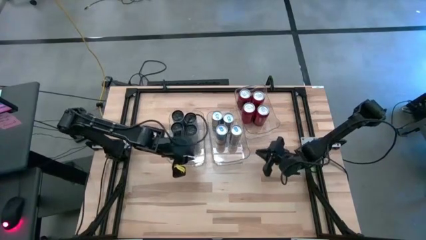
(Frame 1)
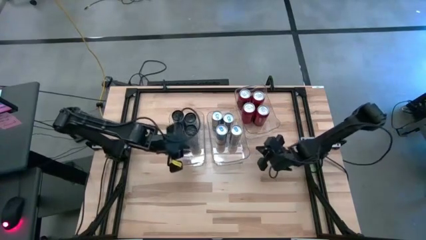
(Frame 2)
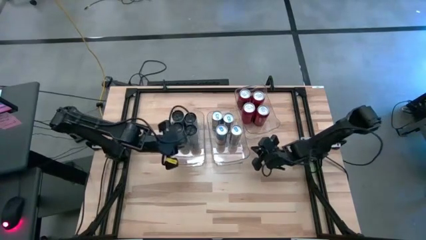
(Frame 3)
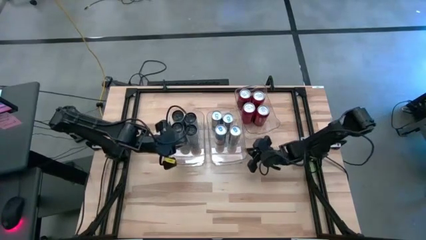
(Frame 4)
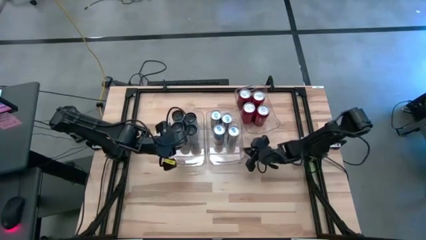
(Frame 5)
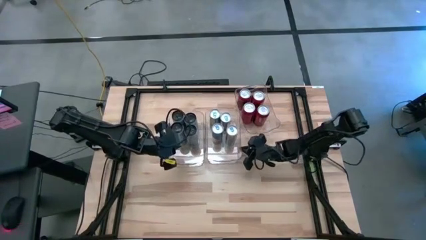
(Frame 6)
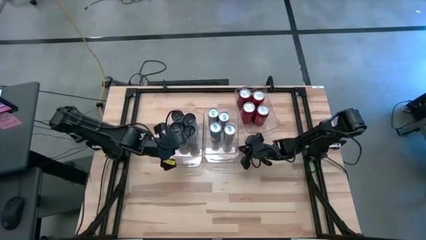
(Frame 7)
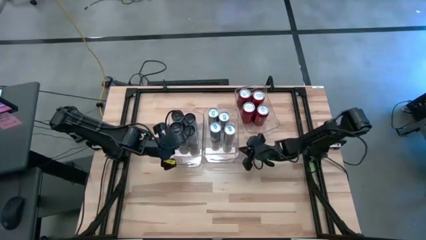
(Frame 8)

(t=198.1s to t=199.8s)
Task: Sort soda cans
Adjust the middle transparent bin

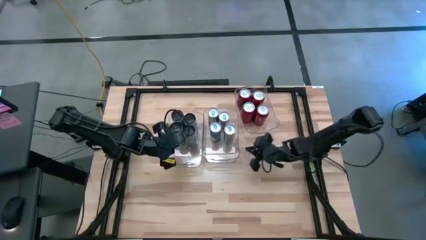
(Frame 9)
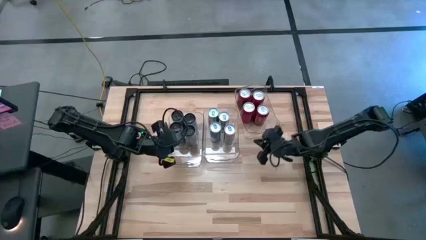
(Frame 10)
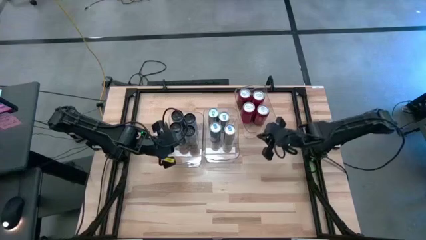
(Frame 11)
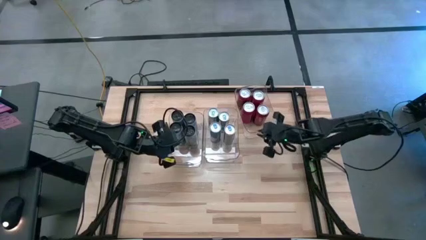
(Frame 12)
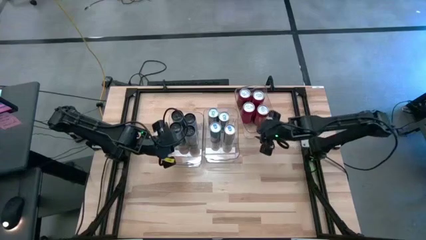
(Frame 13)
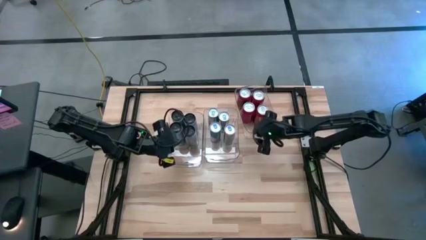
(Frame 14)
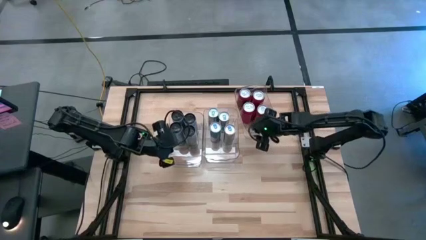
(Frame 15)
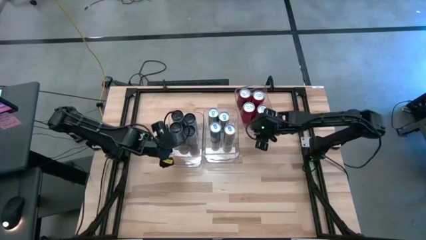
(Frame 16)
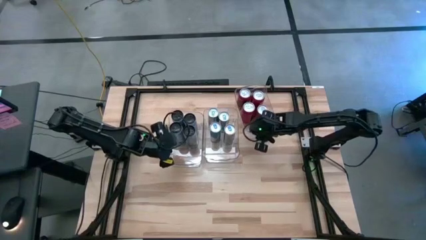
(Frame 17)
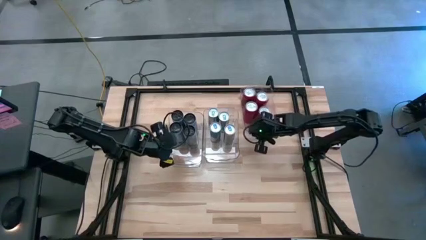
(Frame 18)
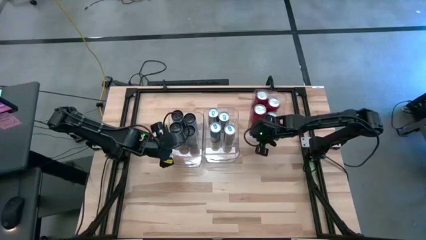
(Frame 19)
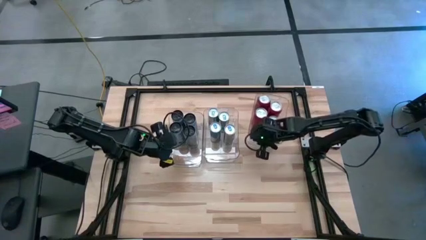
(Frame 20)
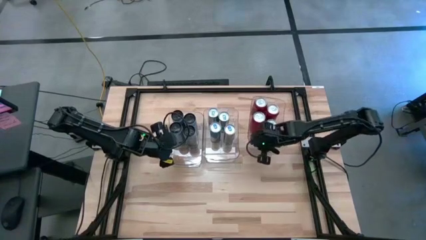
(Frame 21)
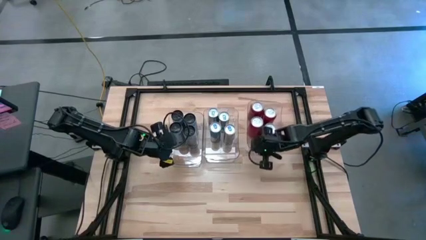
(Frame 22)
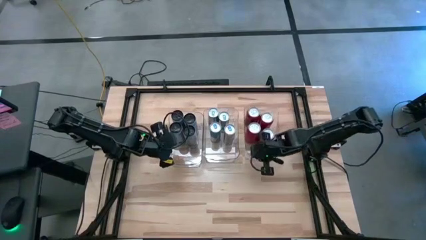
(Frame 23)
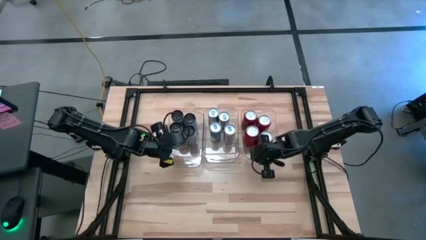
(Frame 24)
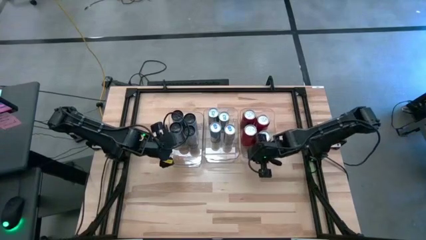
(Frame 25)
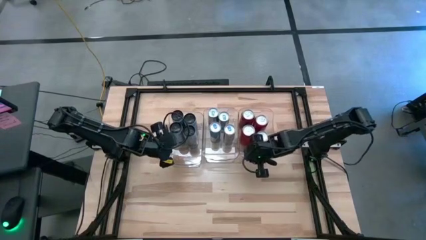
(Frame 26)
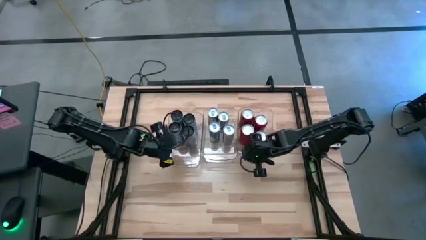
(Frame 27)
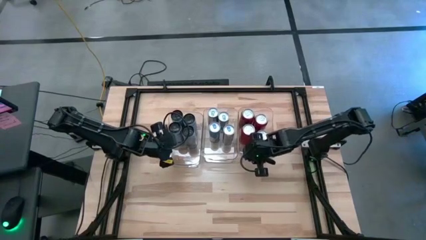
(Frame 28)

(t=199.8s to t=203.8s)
Move the right transparent bin to the center of the table

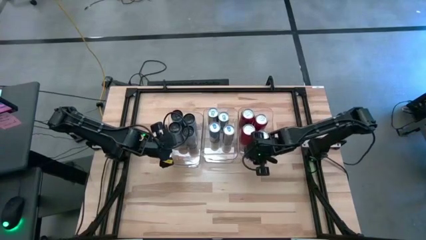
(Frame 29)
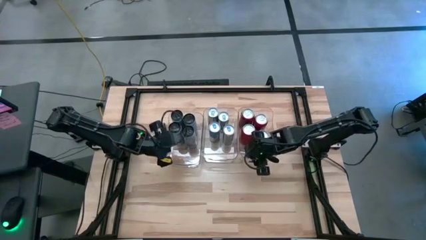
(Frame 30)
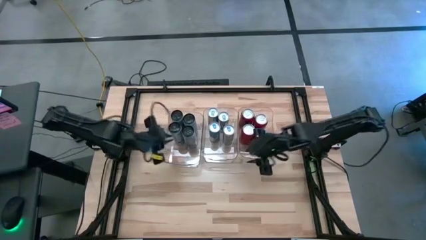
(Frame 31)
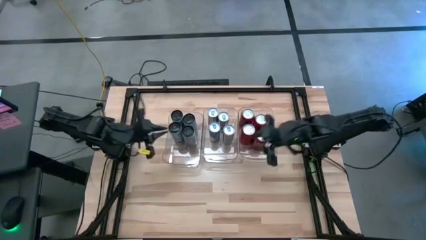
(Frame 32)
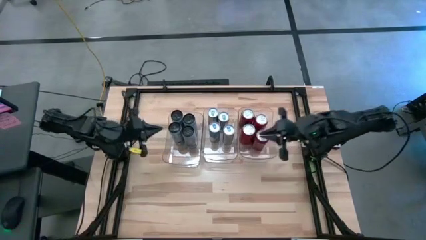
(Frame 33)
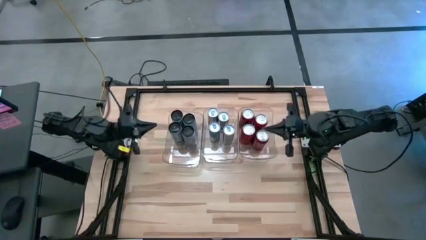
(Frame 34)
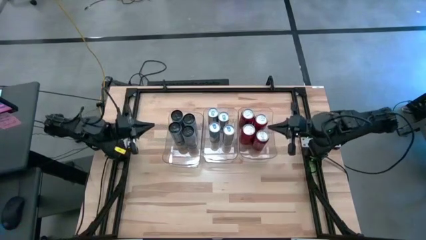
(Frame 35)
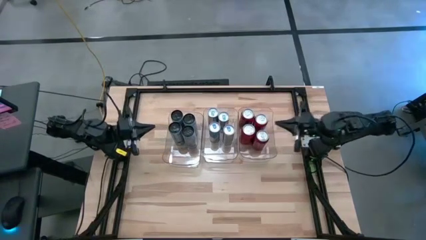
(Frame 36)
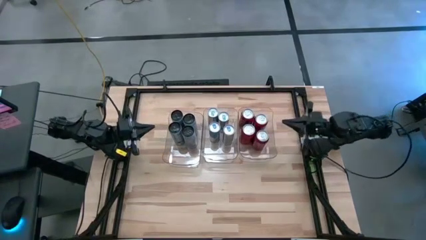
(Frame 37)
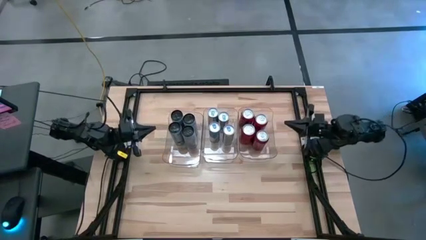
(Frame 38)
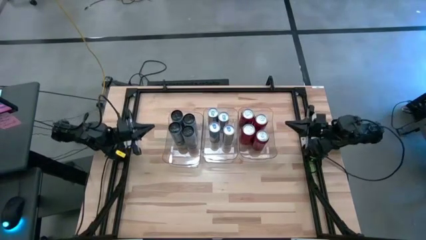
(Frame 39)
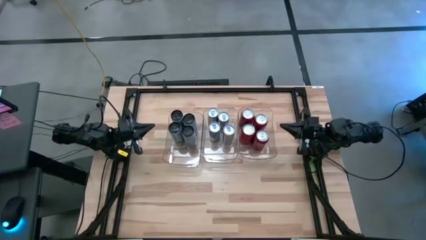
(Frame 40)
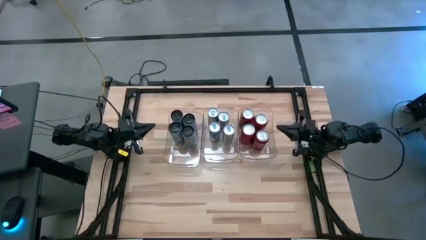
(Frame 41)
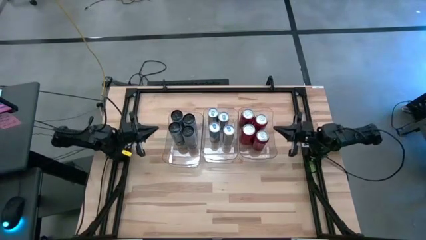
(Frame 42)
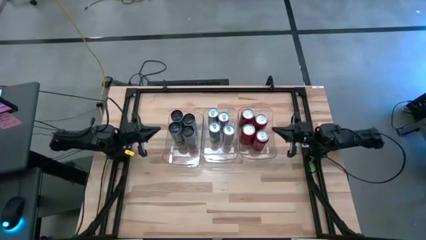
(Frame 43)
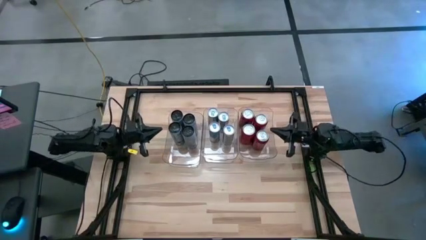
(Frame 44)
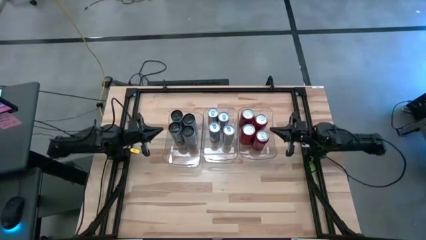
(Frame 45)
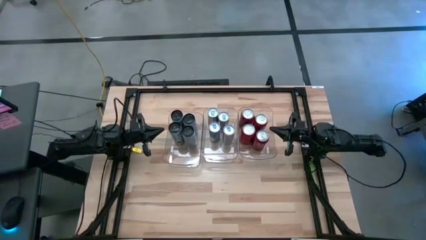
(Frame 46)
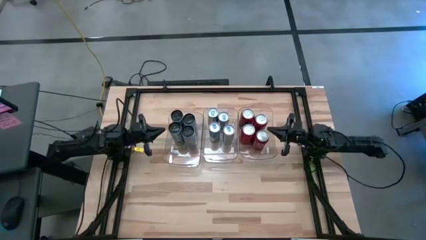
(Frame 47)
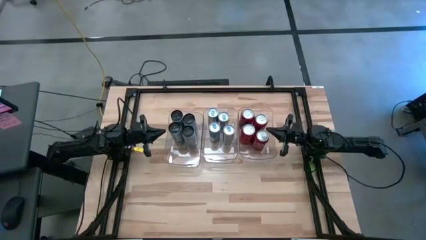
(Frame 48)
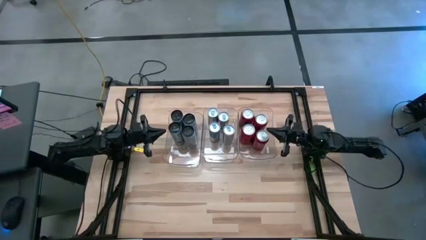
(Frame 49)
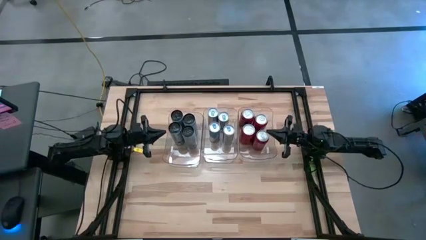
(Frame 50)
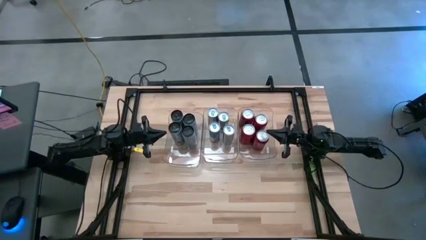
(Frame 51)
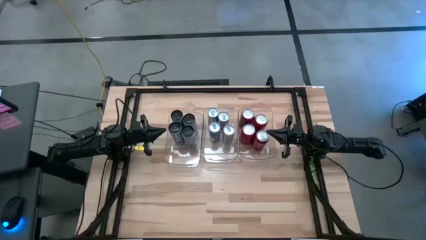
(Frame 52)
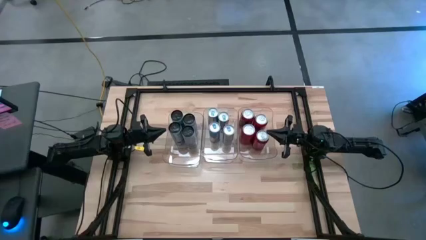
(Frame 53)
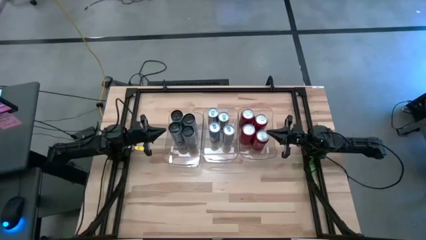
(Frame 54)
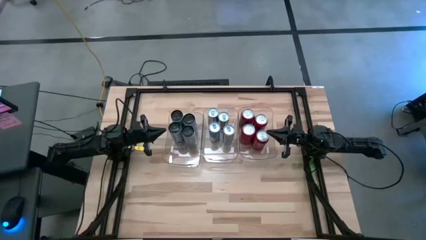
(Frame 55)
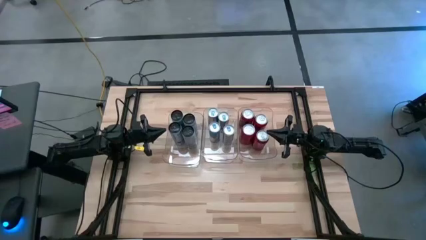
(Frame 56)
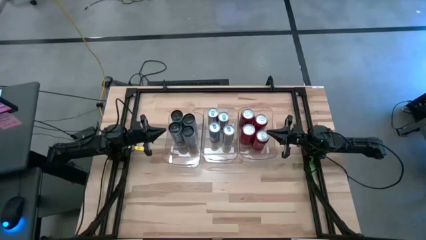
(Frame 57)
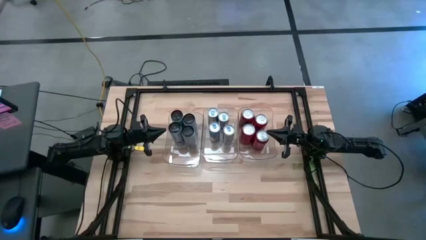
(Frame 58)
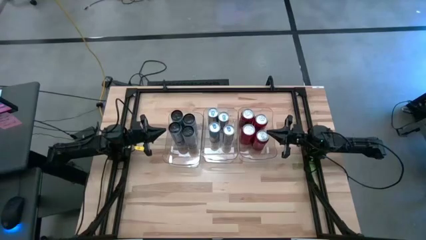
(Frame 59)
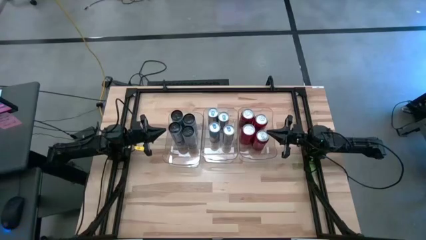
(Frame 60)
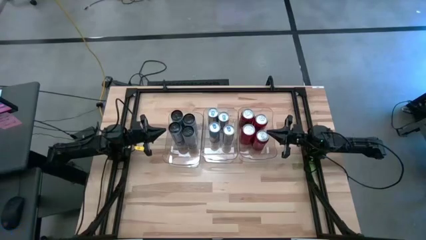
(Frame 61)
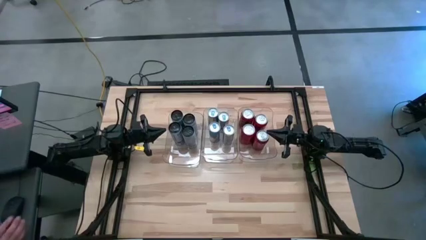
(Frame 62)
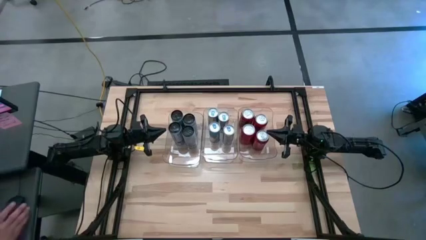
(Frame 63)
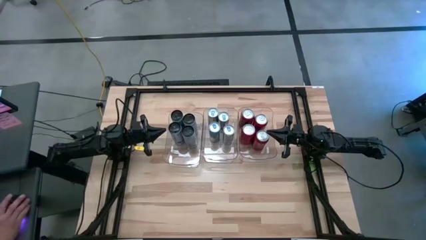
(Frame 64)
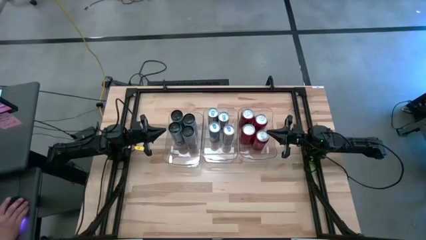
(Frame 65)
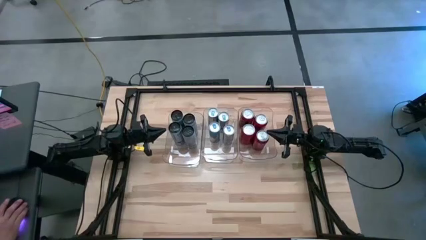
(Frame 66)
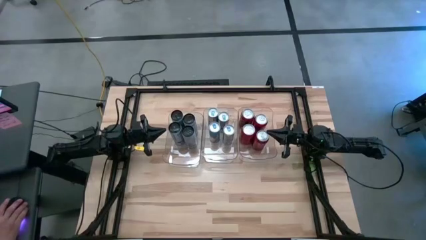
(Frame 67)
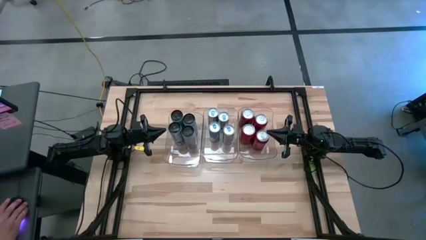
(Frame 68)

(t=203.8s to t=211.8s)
Return to Home Position

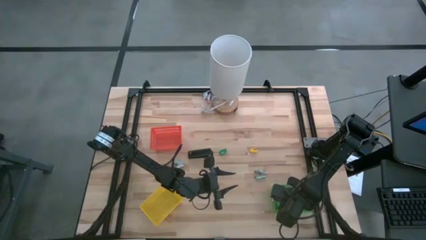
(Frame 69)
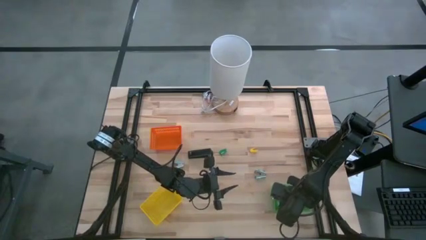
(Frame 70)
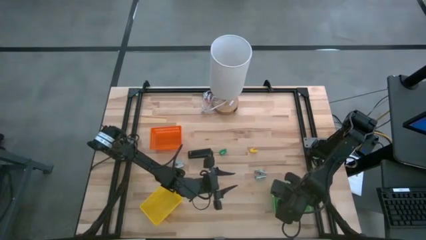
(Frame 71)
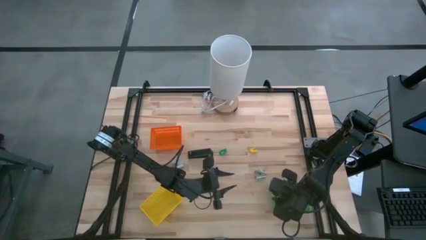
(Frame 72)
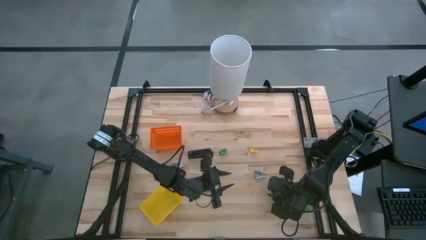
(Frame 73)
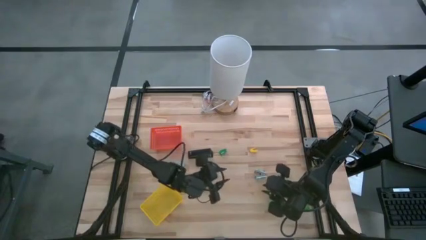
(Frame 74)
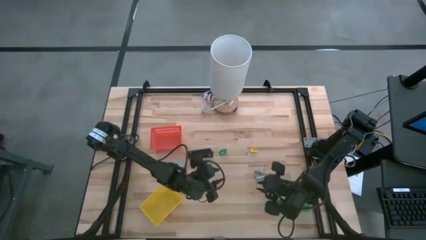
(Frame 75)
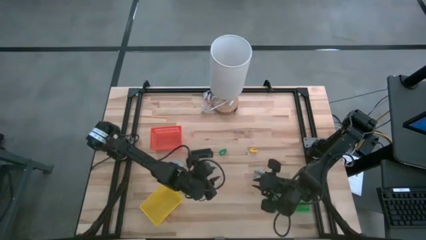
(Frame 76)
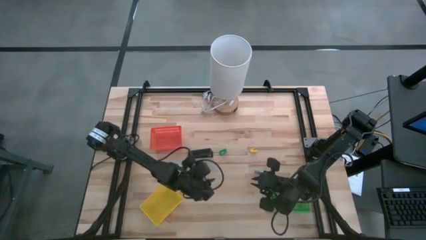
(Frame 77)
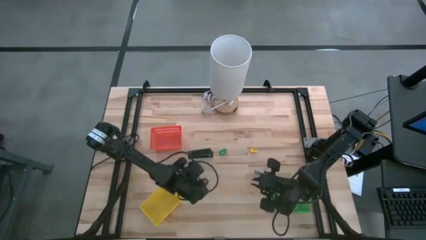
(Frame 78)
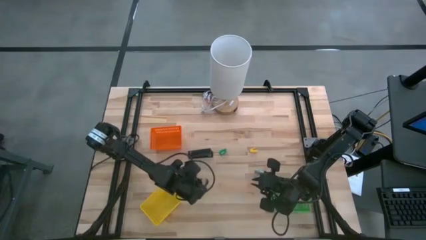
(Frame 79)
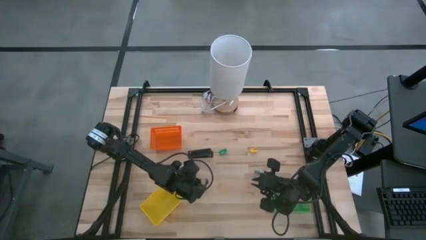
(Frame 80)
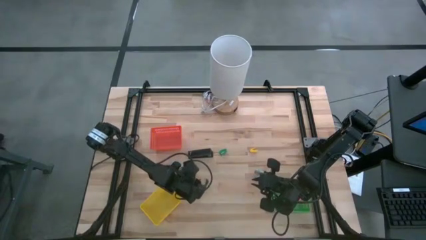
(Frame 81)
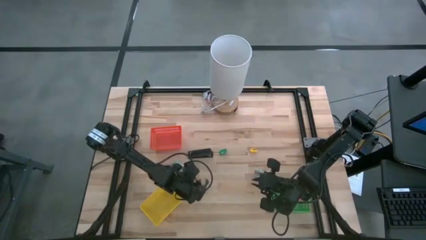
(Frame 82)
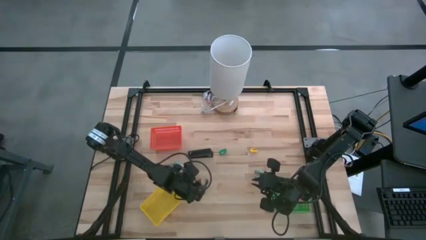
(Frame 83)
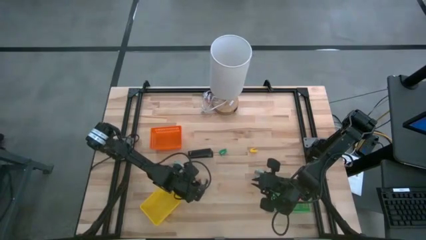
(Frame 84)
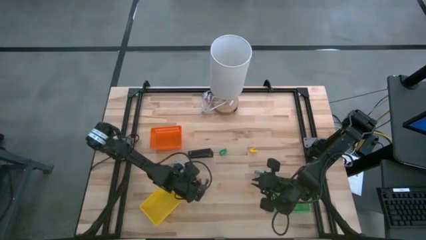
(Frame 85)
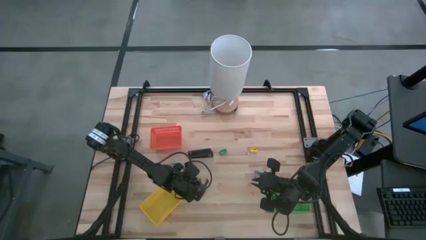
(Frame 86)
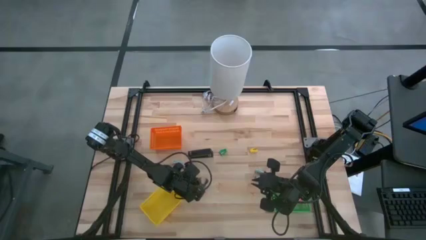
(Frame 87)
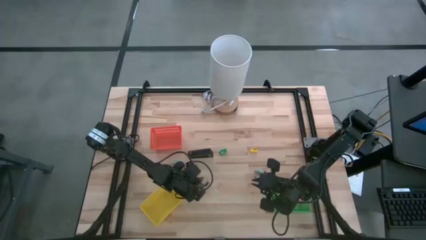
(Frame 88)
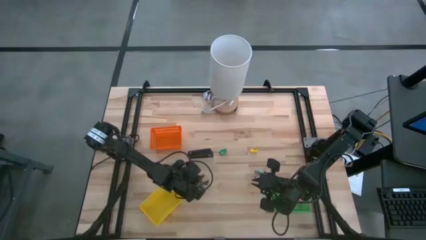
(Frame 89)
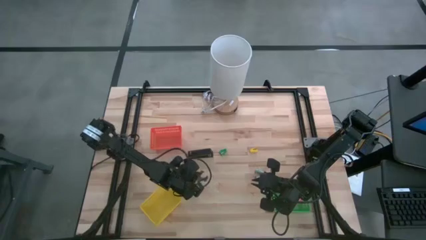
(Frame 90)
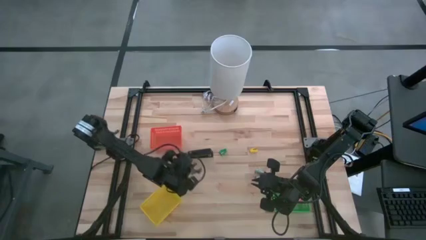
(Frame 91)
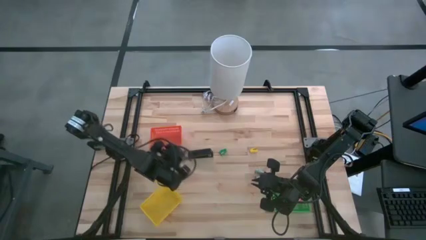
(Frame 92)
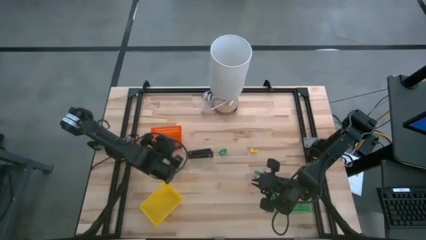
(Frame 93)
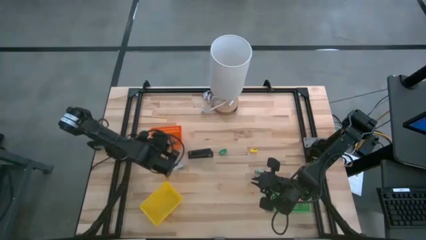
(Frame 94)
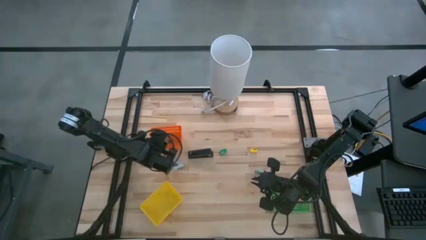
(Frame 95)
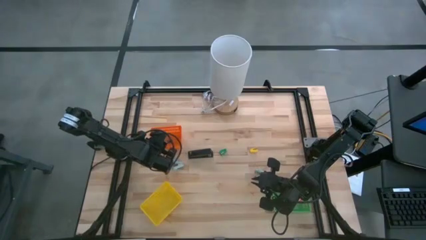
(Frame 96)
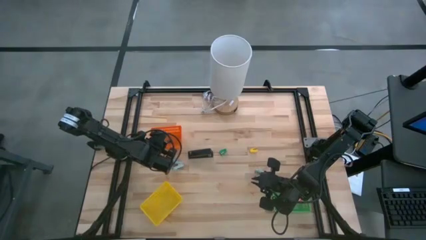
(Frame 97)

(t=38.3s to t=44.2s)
Task: Pick and place Stapler, Stapler remover, tape
Put the black staple remover into the orange bin
